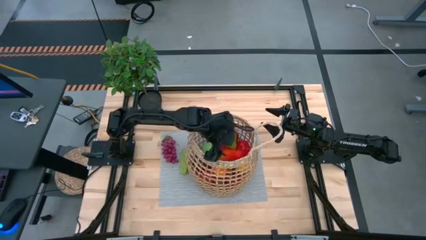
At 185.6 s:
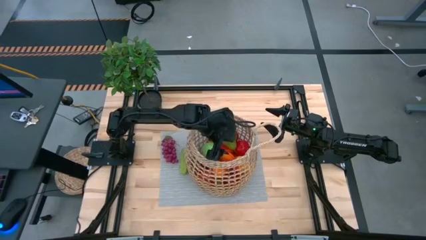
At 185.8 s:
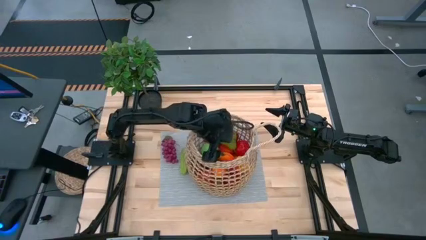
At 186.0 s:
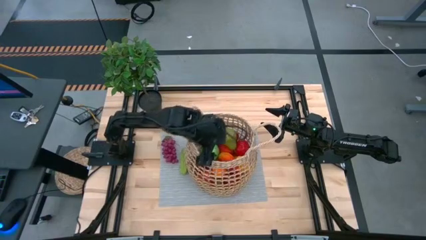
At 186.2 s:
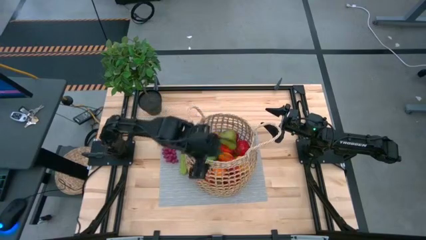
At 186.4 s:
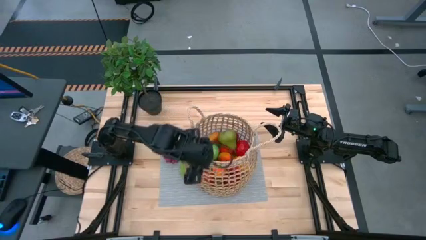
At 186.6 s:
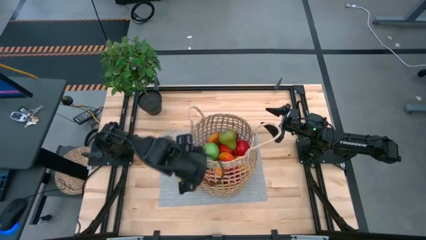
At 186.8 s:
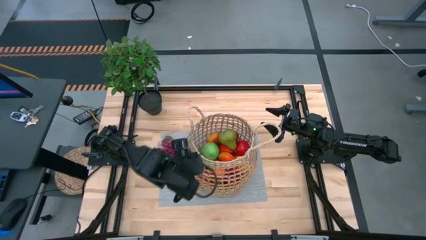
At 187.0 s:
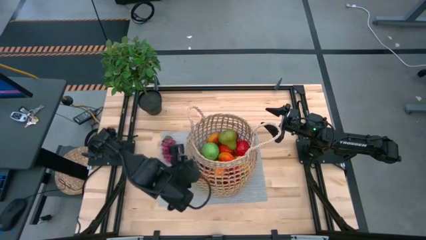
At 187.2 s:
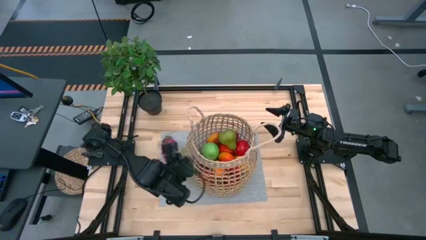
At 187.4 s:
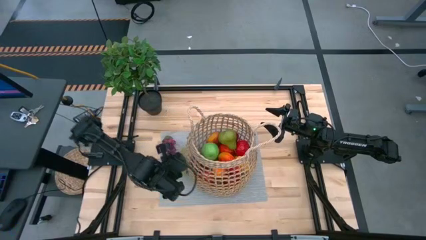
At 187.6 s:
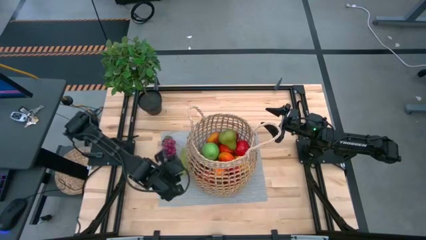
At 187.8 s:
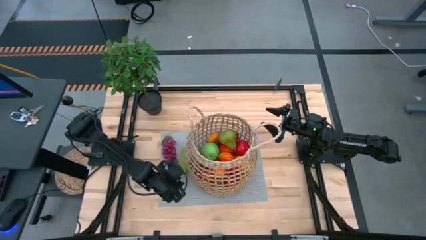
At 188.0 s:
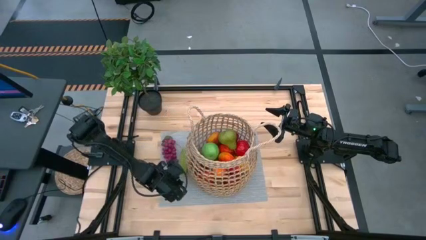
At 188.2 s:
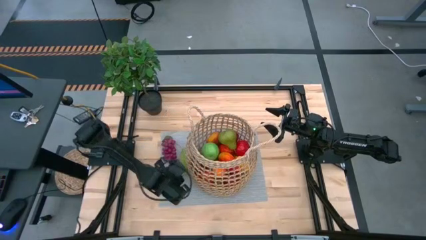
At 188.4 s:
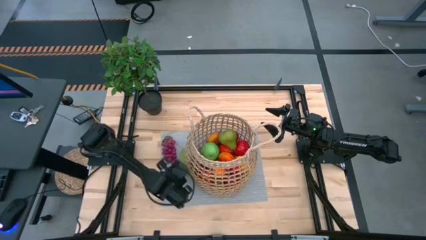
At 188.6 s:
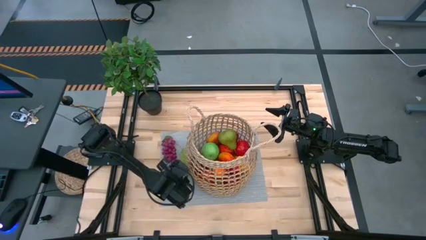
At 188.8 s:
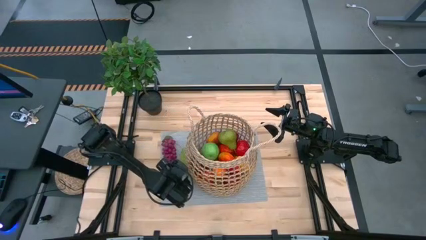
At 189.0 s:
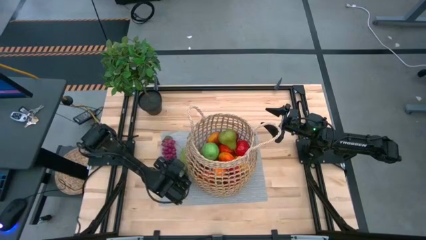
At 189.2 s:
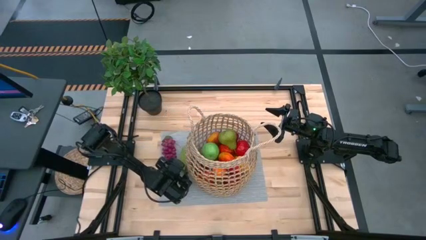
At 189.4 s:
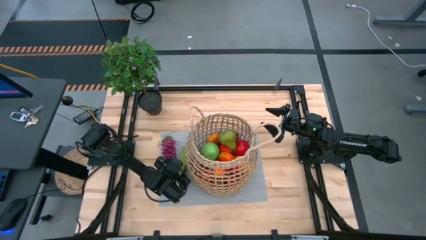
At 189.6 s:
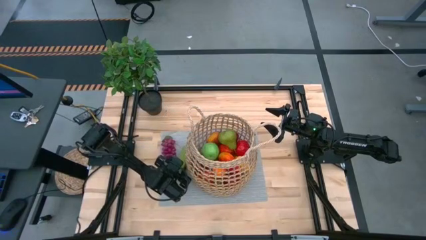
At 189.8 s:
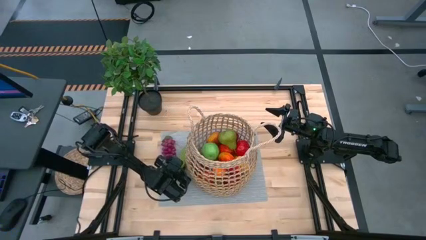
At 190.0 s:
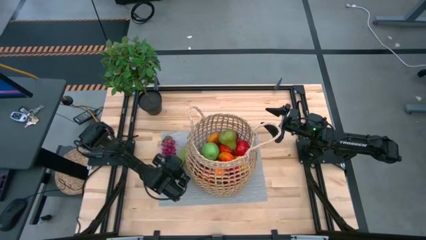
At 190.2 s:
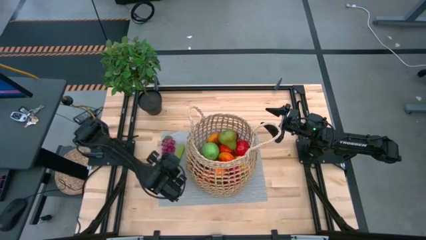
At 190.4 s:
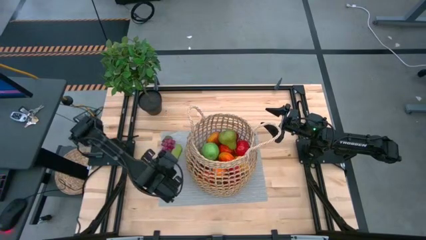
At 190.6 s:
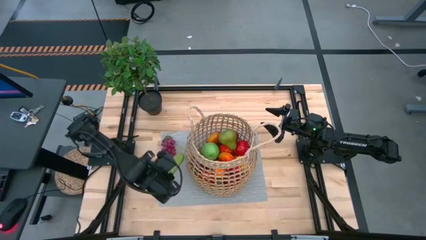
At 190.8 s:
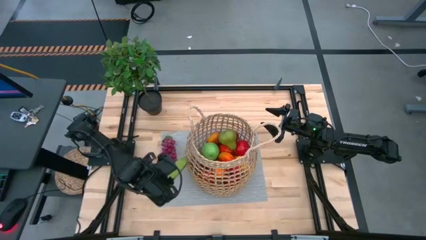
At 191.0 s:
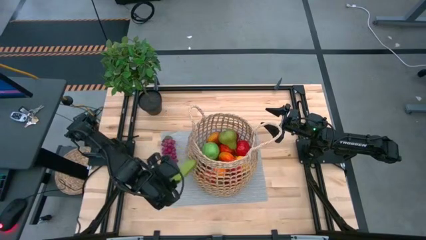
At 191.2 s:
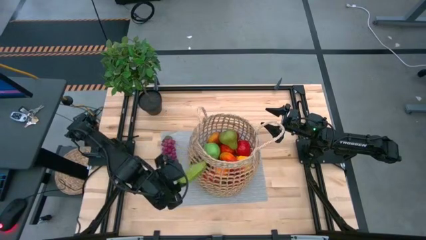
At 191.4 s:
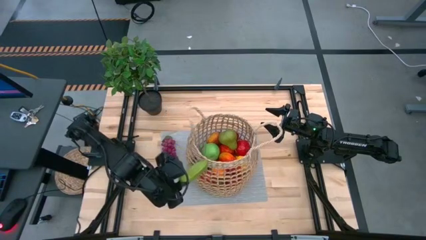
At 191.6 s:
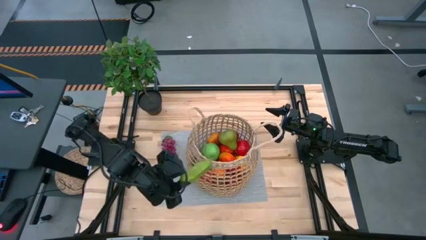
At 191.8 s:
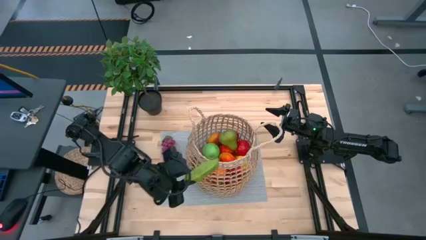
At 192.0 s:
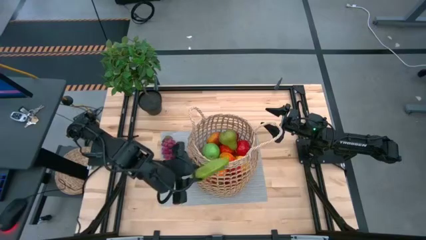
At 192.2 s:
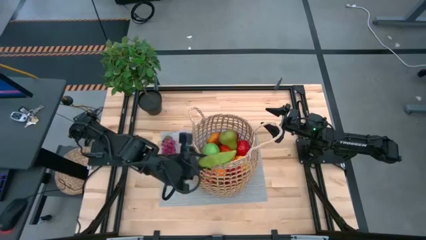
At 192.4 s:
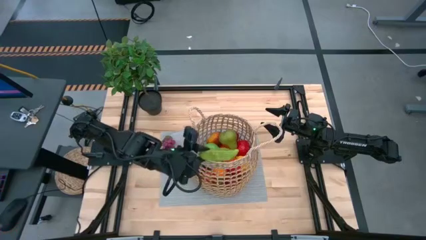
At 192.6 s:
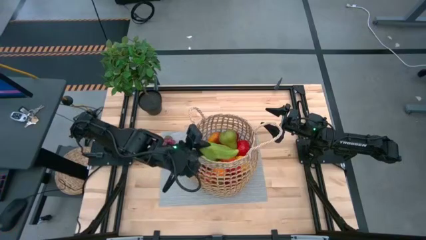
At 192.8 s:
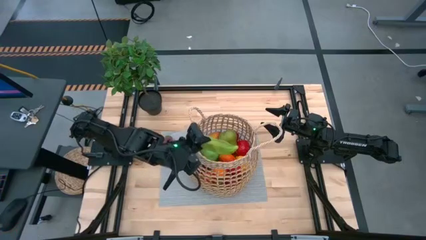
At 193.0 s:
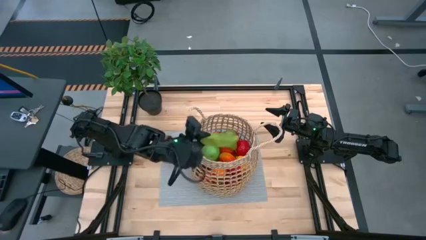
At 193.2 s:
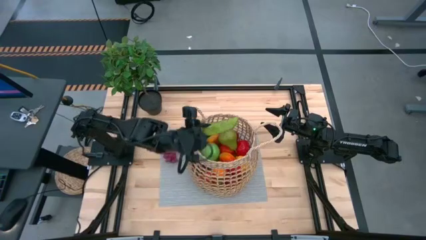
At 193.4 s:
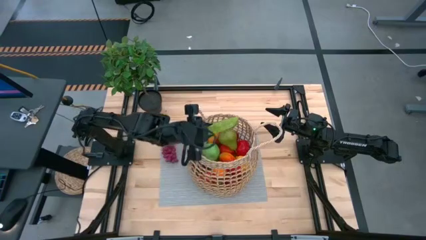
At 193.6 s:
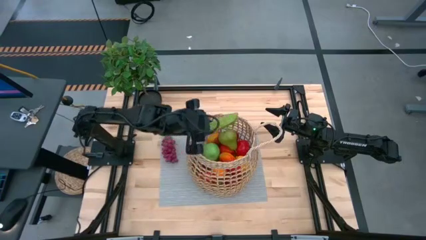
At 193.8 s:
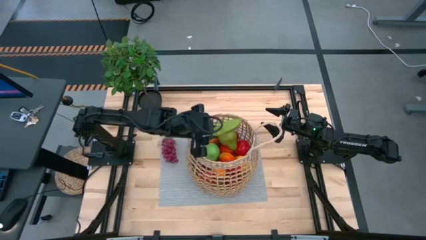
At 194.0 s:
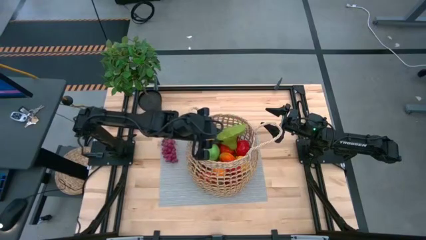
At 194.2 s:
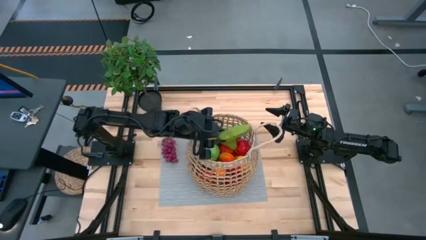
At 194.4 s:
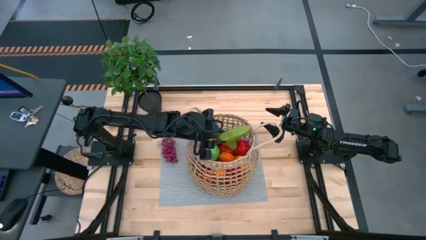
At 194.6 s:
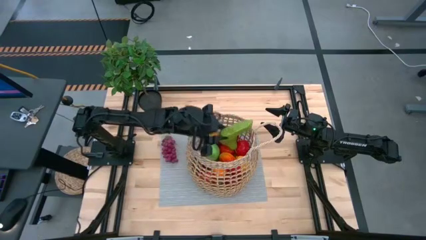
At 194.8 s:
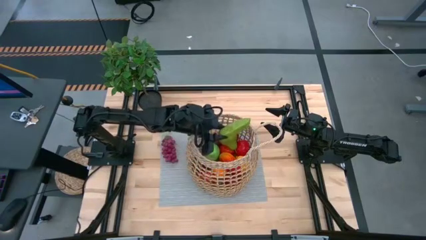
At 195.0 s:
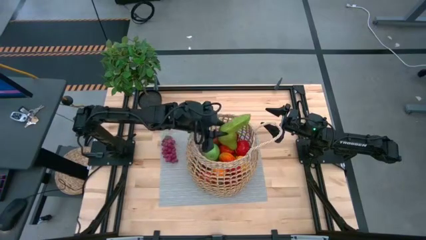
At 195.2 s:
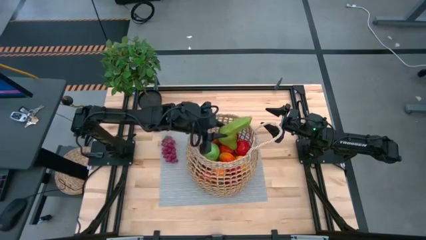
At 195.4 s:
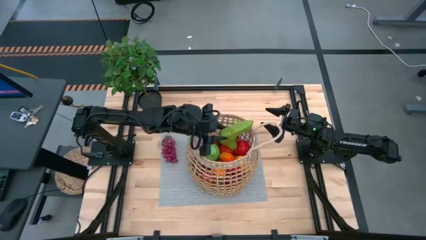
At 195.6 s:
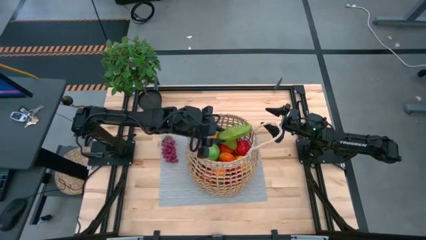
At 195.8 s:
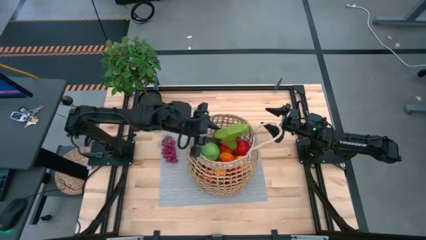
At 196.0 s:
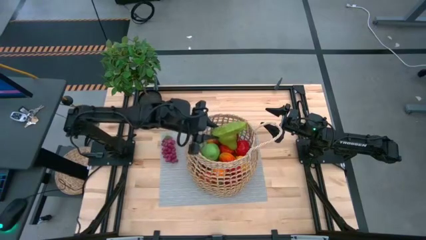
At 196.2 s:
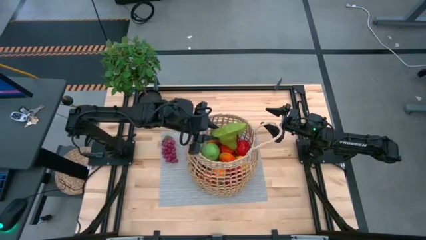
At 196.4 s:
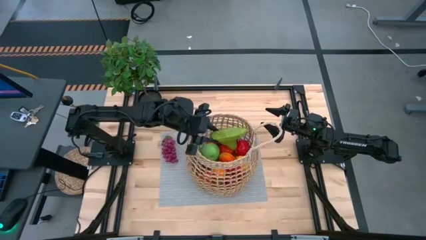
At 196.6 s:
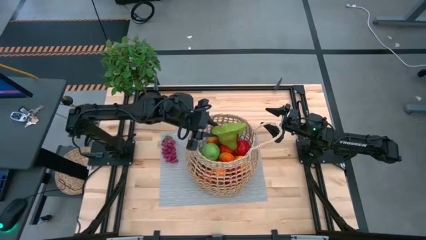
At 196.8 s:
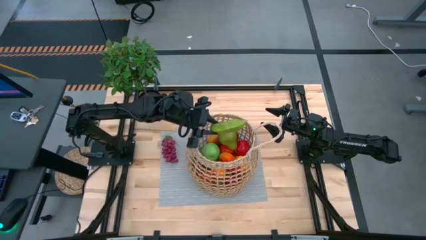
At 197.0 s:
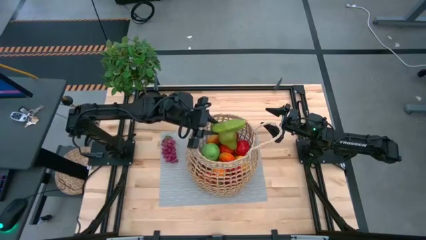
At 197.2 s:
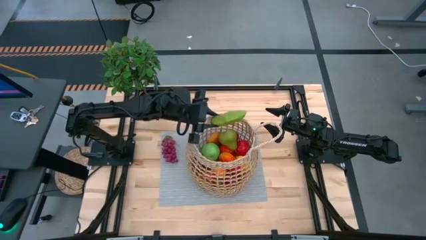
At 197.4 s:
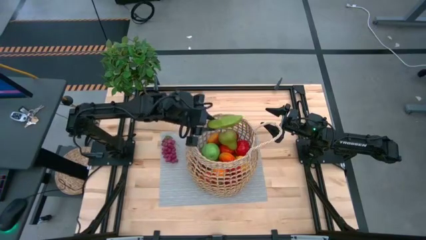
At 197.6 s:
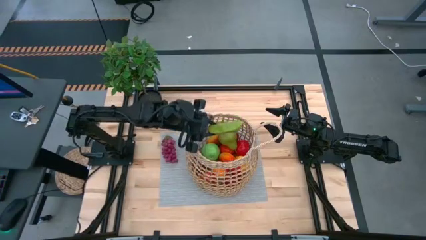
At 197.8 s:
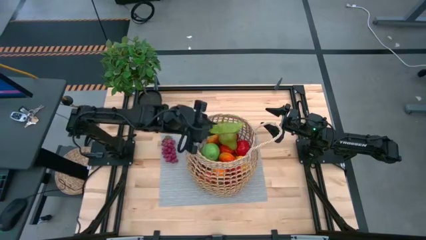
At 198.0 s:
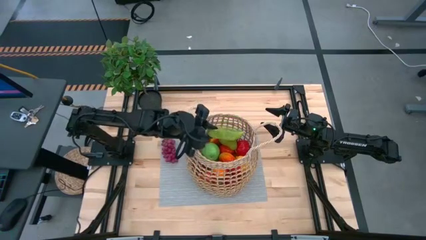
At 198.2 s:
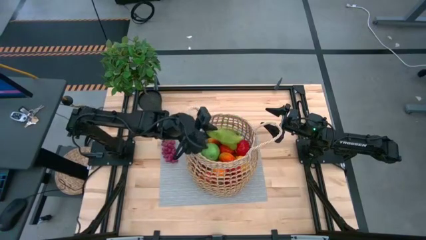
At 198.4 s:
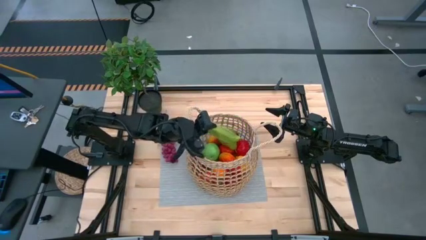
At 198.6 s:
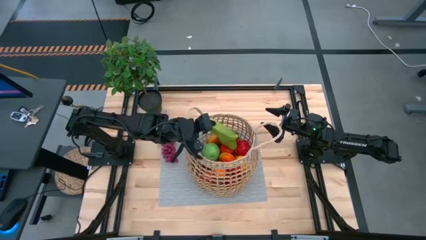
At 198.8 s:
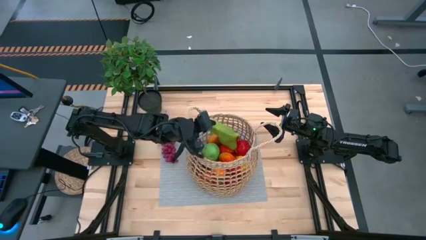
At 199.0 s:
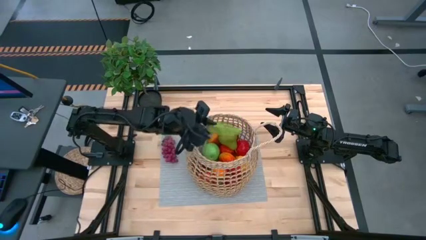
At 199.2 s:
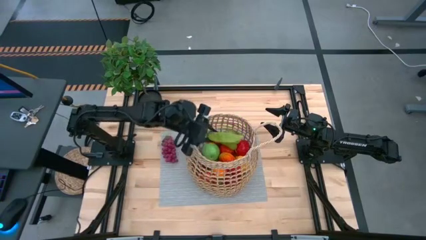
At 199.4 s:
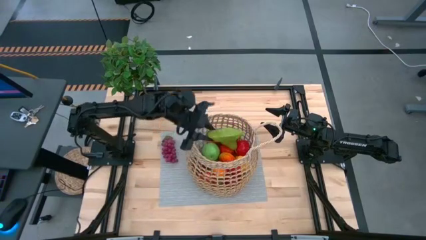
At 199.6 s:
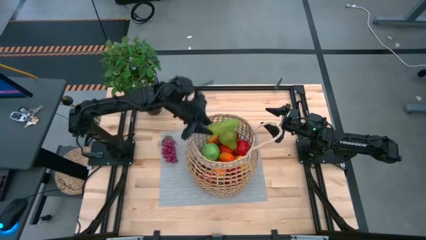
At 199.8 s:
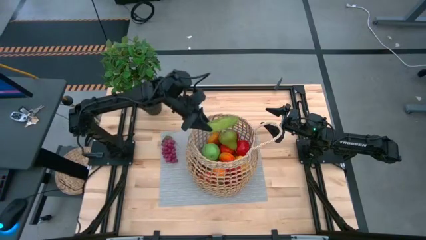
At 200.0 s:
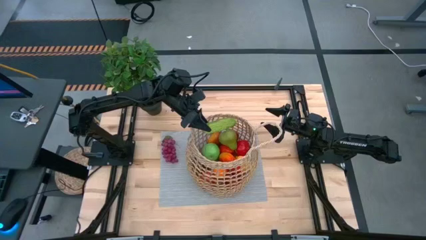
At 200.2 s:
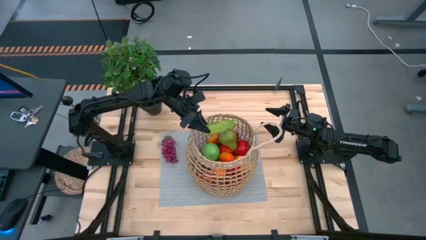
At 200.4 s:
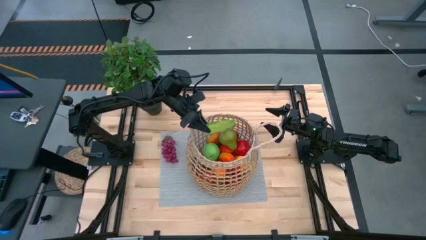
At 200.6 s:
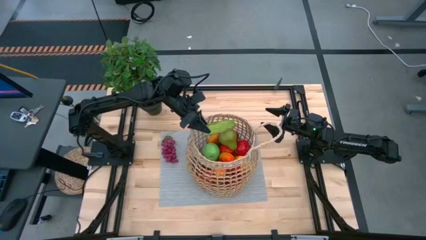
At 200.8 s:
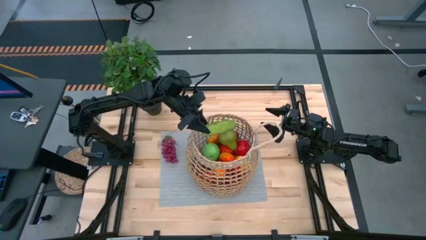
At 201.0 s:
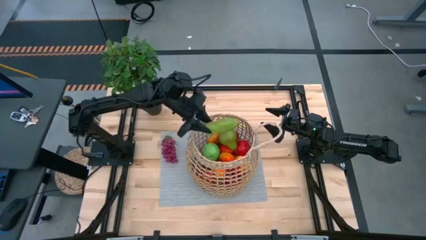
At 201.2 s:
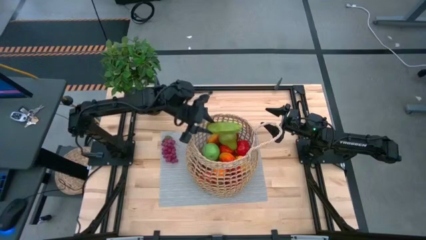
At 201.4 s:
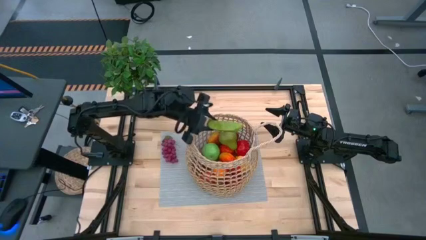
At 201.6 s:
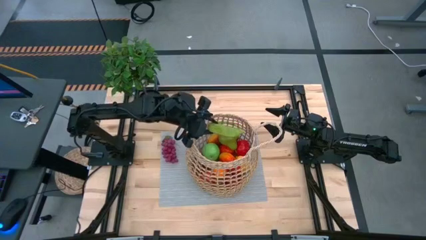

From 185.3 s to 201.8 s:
Task: Build produce basket
Put the green cucumber into the brown basket

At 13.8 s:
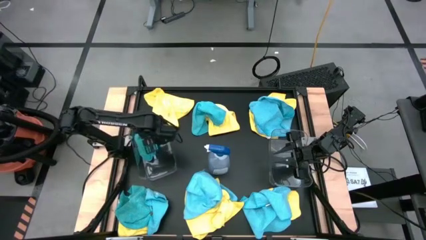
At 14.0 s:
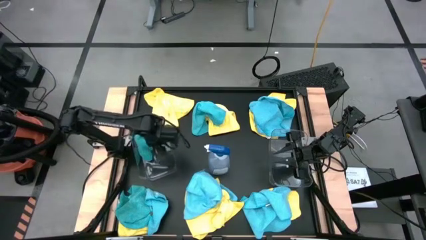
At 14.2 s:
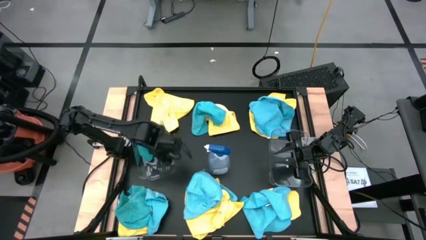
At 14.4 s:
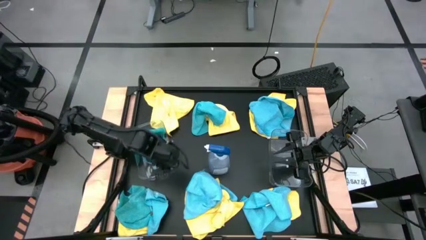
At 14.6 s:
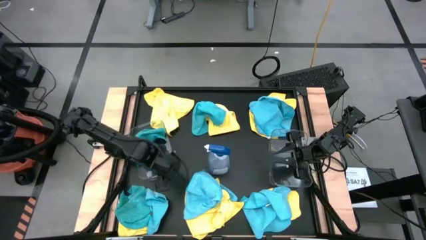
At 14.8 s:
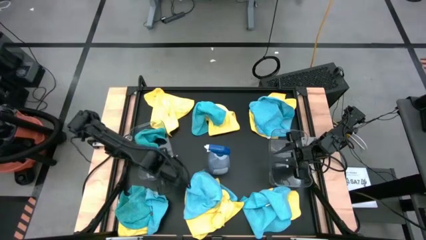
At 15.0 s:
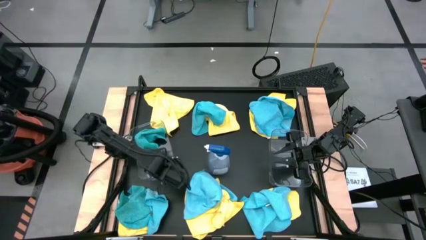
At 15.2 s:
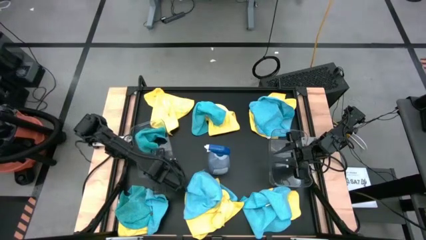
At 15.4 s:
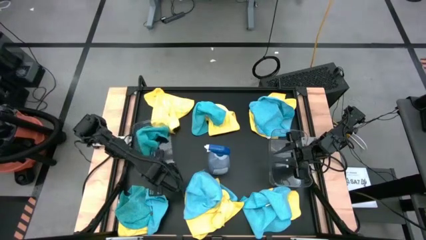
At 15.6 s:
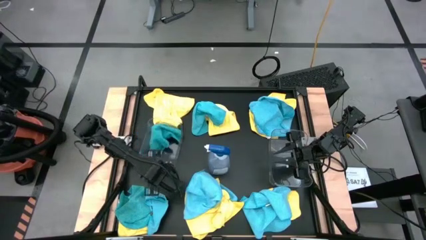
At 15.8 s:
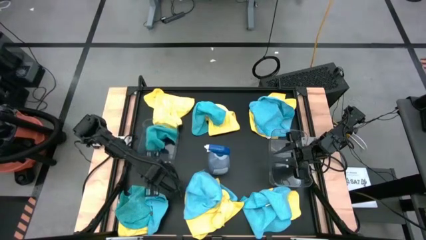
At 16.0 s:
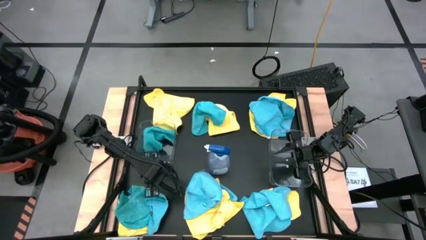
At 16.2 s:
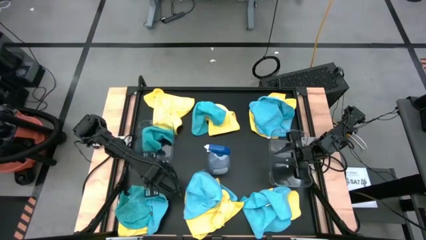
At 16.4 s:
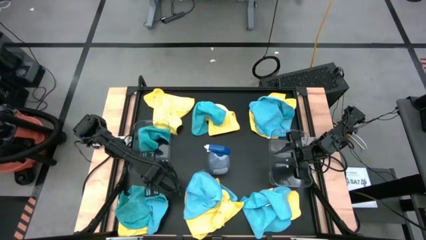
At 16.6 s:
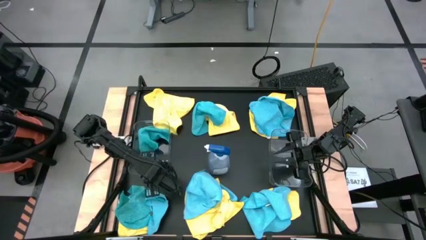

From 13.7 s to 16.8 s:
Task: Sort microfiber towel by color & place in baskets
Adjust the left transparent bin
